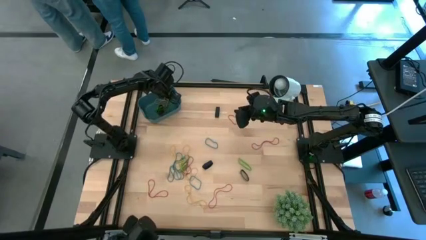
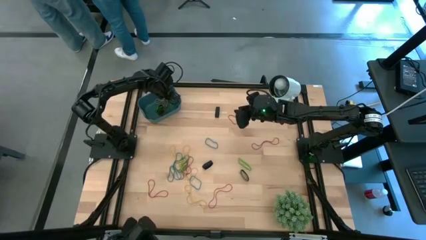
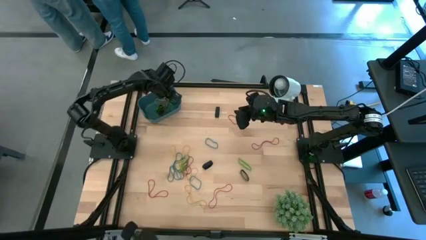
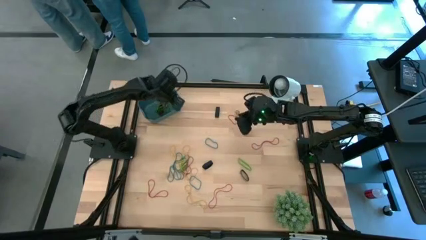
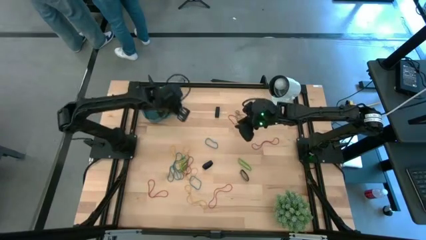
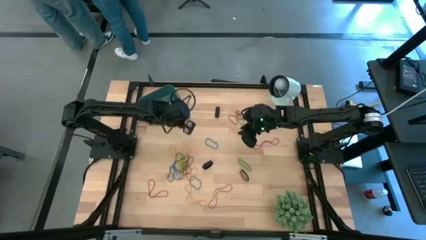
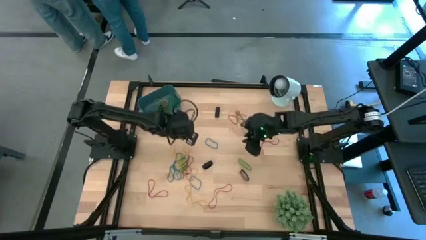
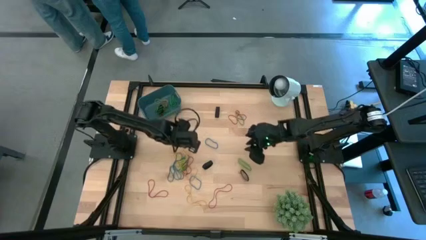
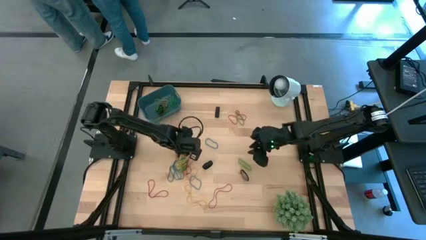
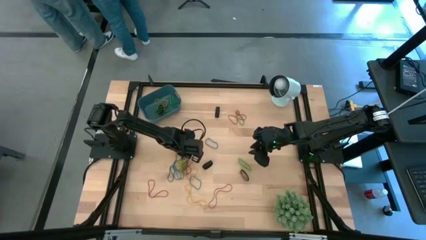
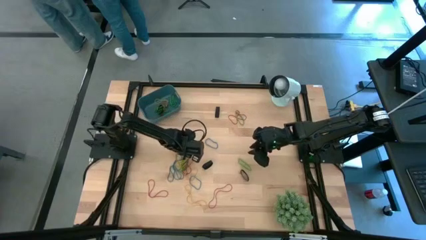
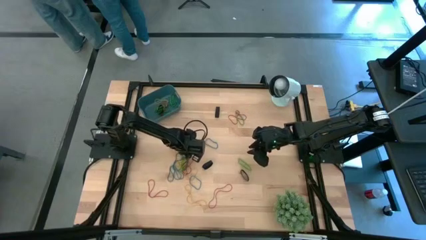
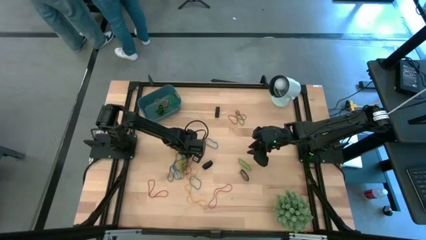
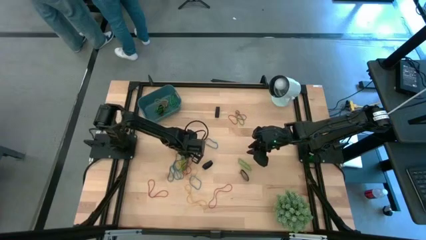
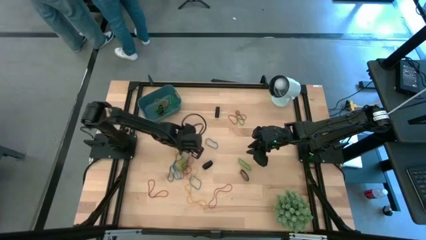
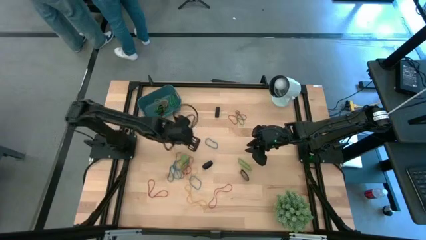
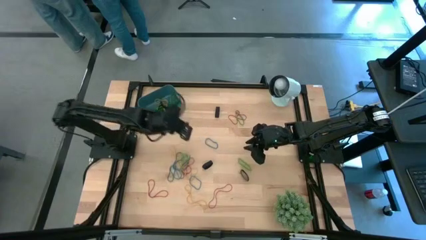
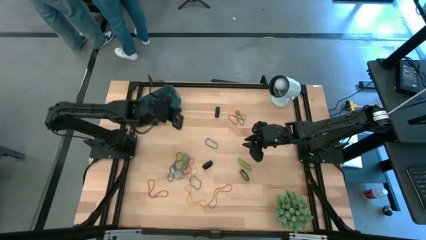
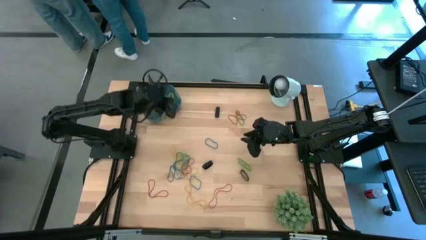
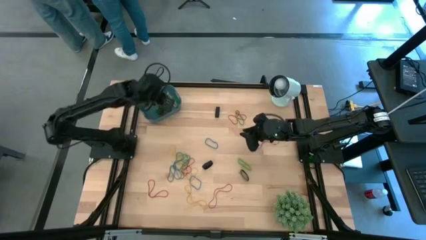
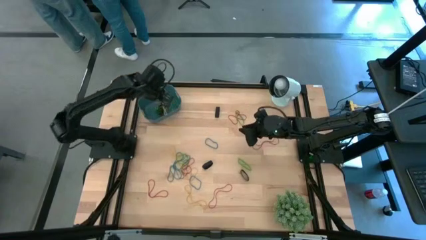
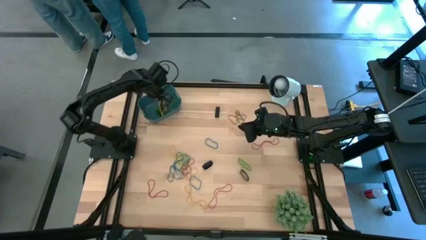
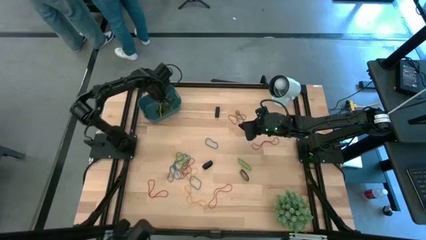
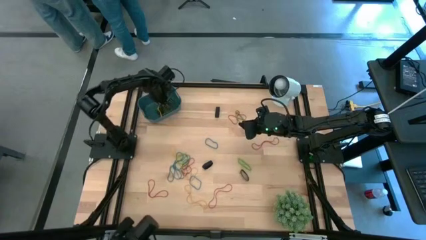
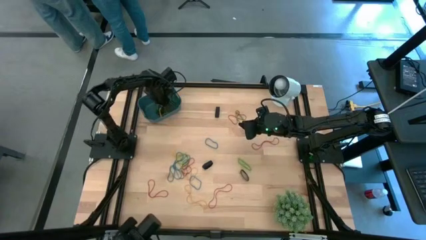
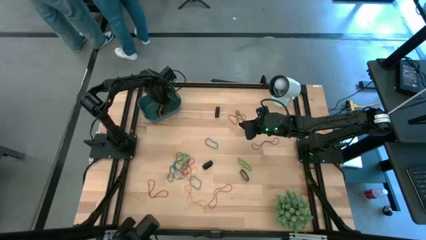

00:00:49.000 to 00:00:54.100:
Task: Pick and place rubber bands into bin
Put the yellow rubber band into the bin

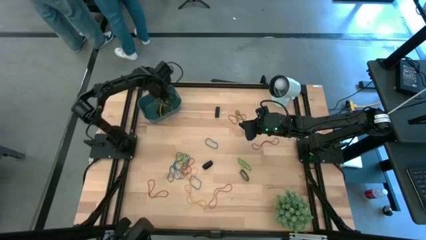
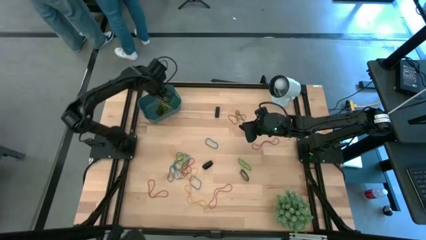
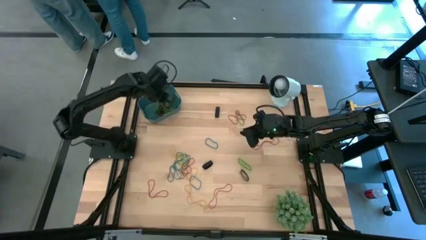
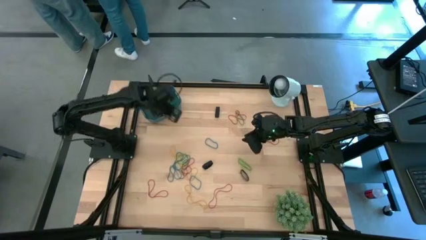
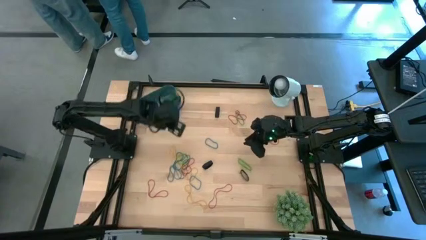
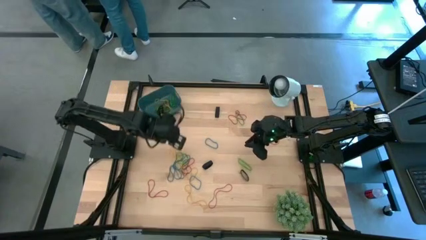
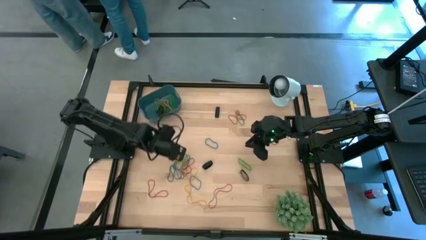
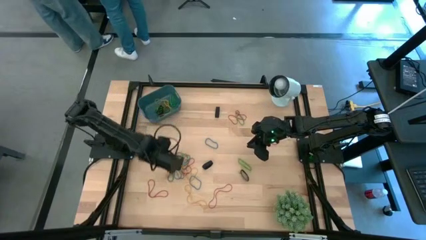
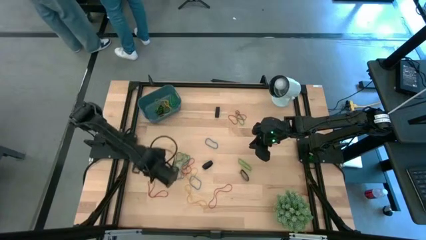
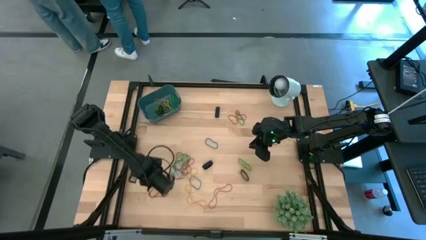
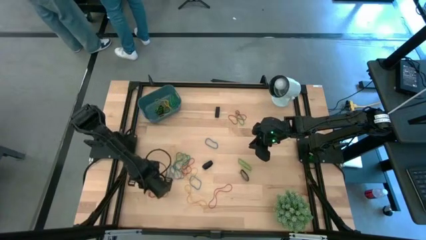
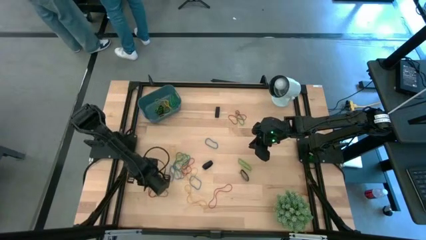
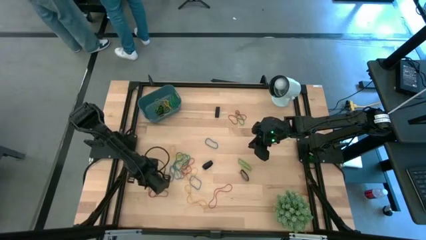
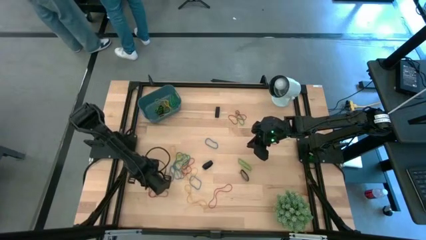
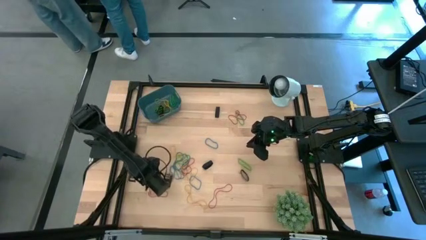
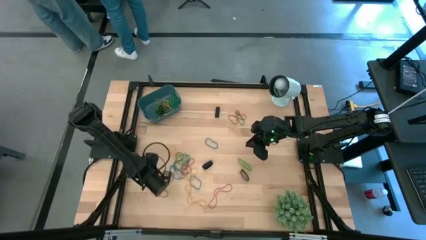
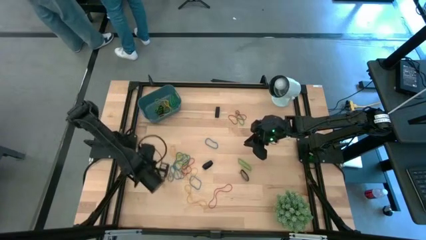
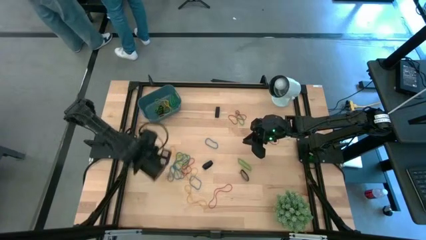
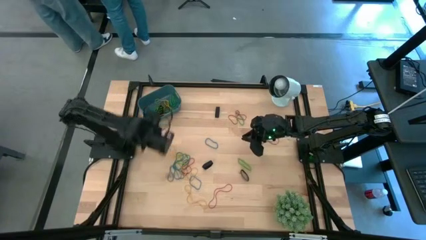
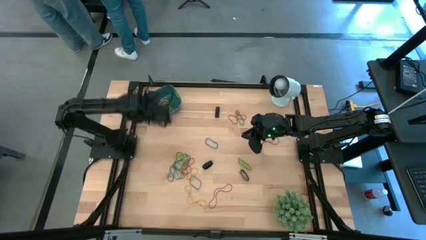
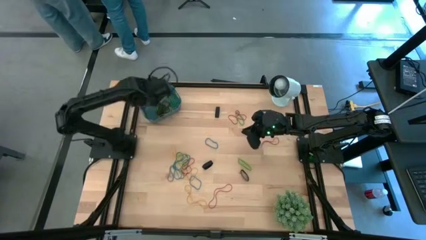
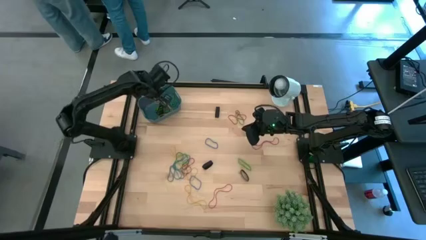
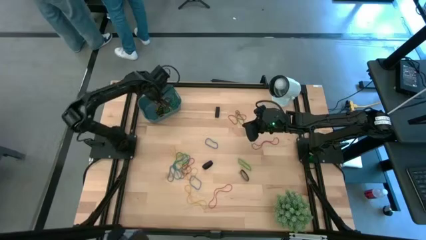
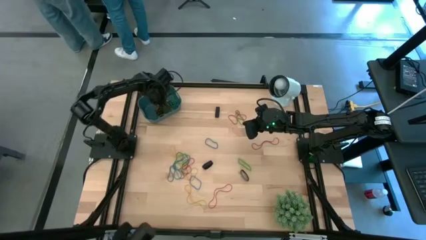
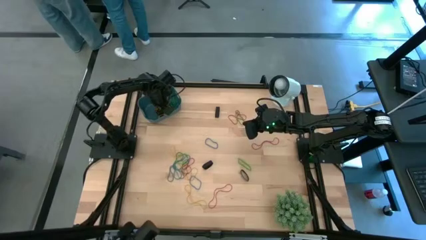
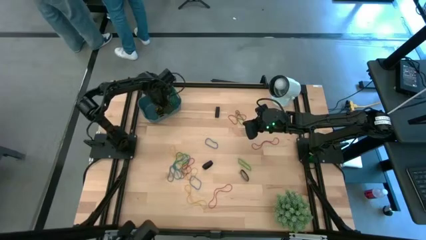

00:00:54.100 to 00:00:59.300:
Put the red rubber band into the bin

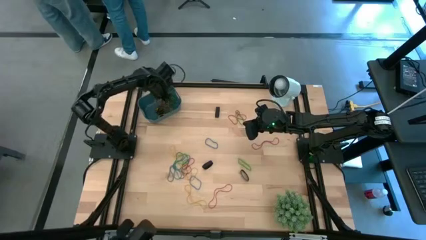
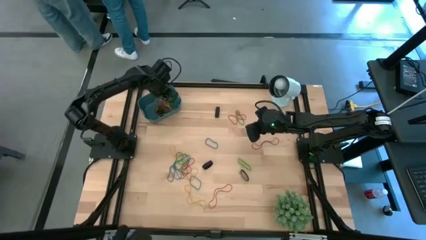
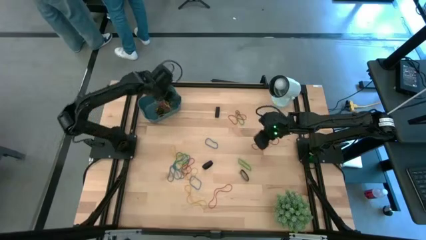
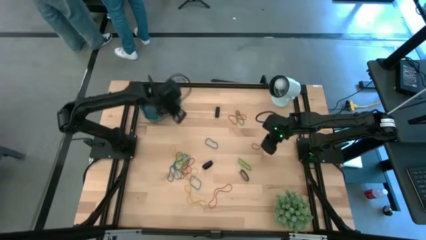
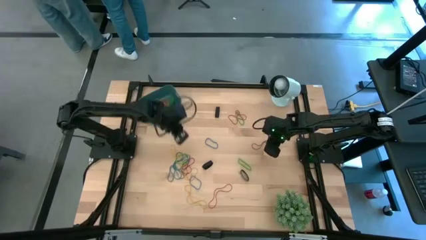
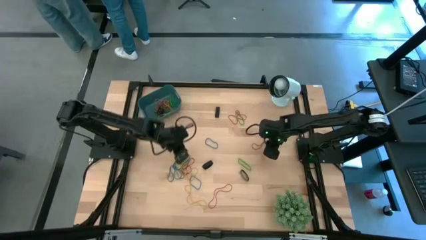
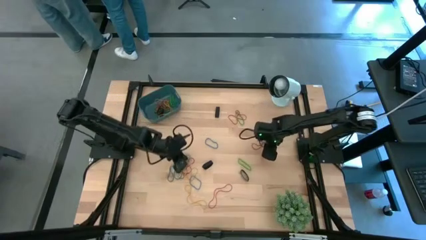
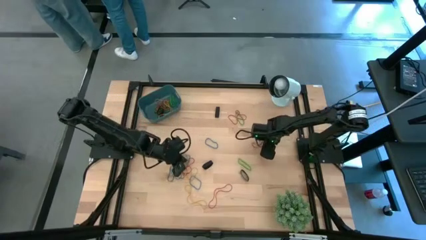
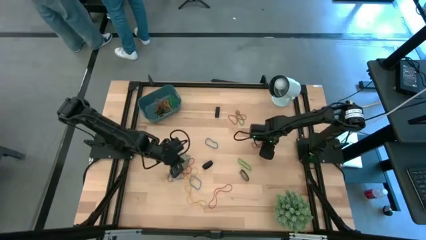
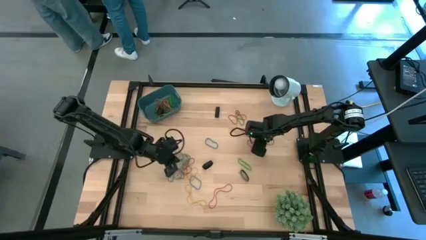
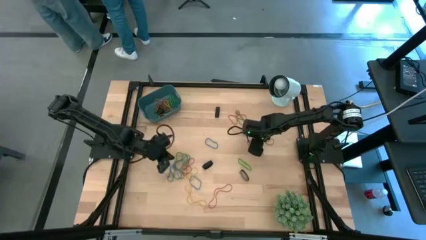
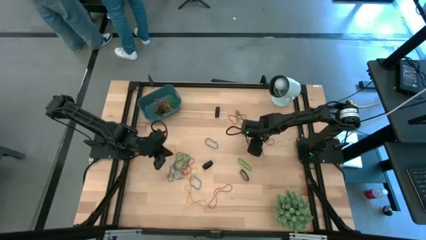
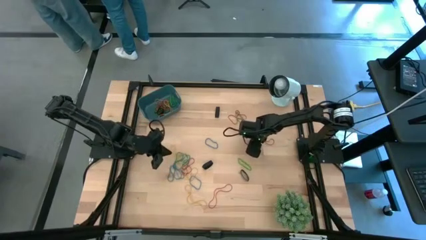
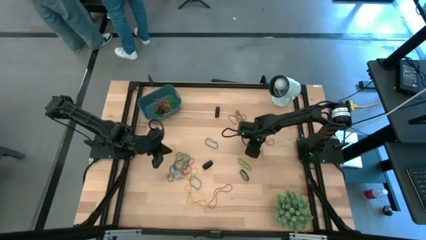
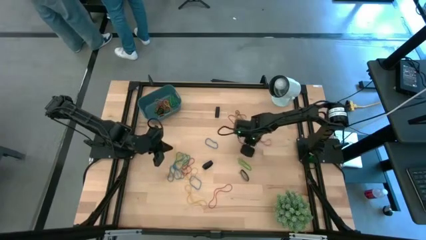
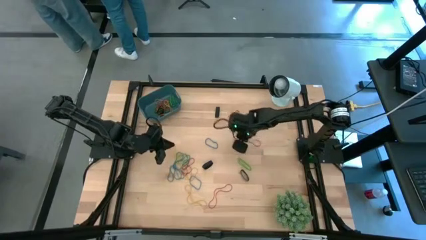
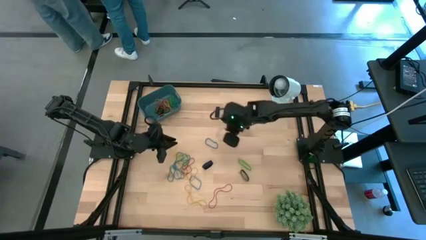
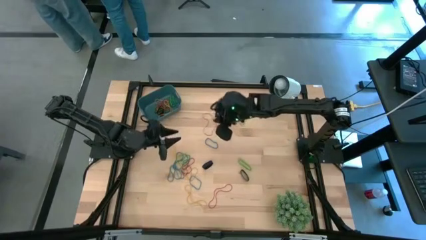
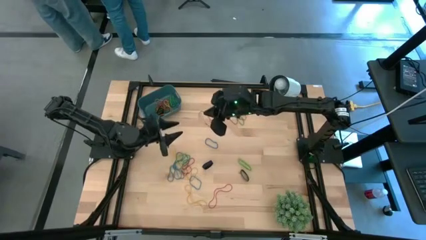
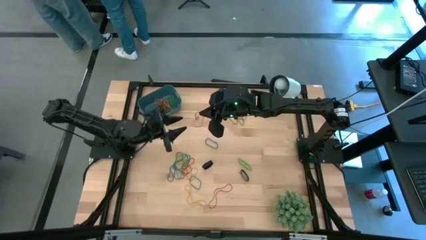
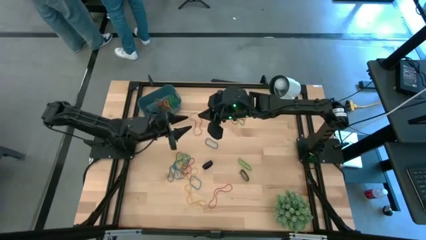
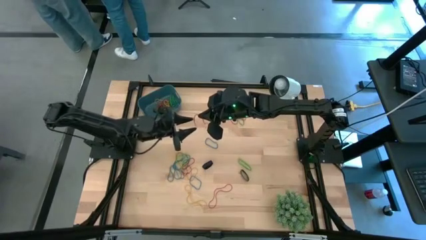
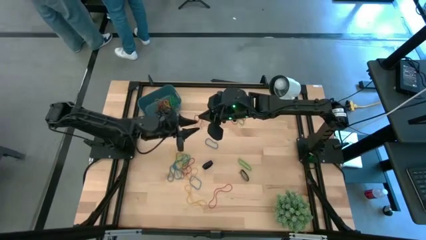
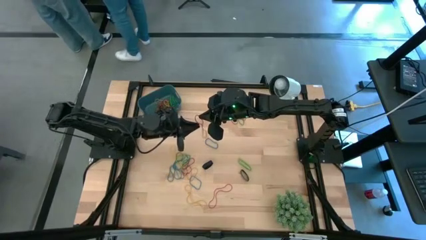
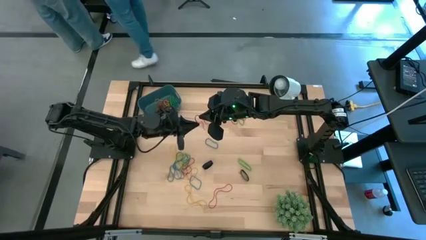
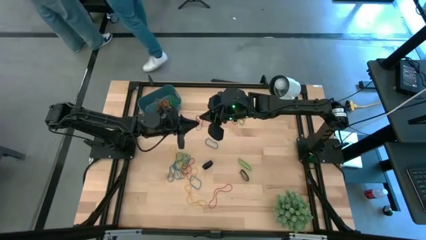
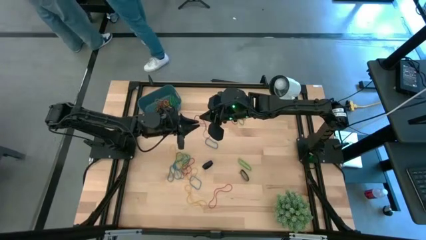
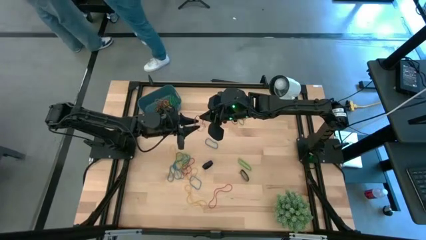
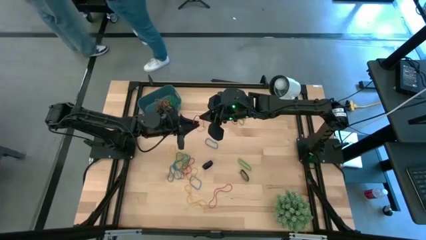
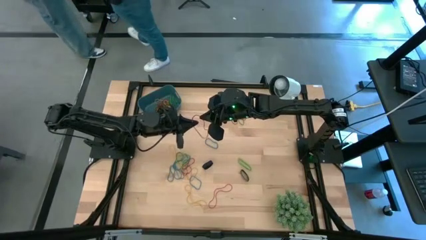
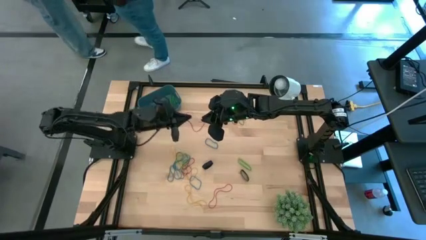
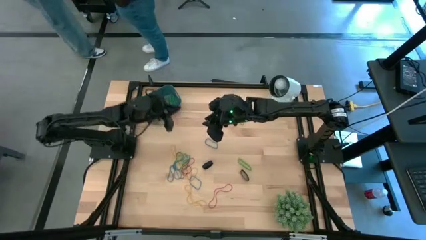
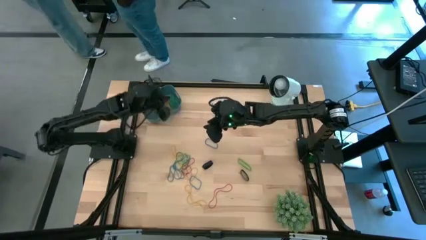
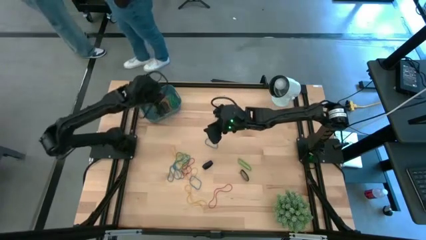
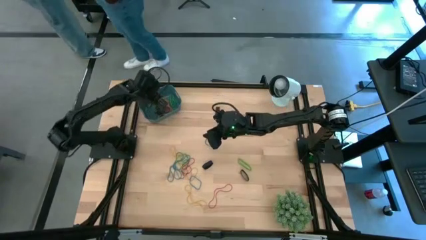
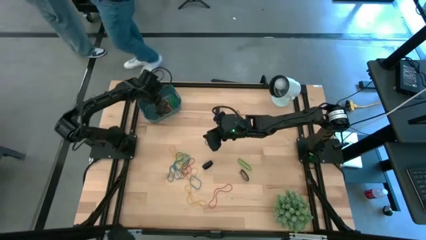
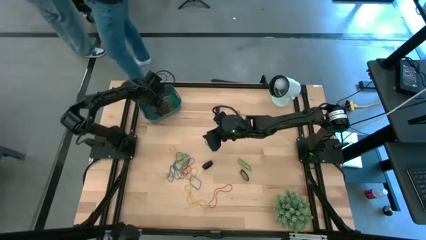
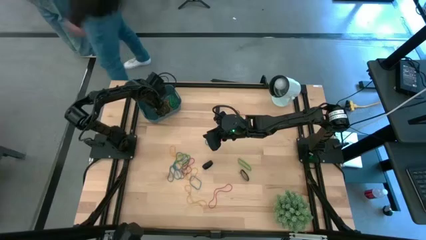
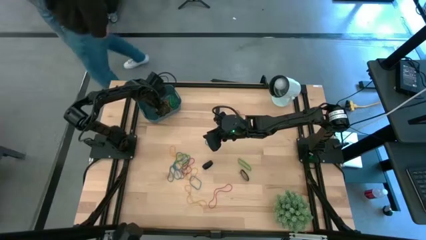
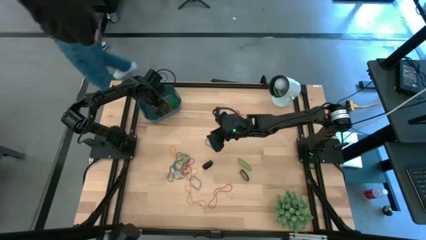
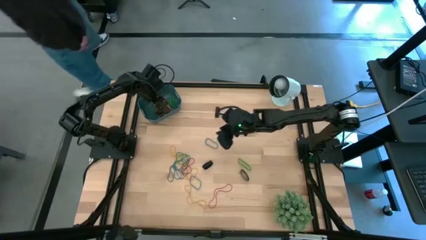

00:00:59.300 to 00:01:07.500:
Put the red rubber band into the bin
